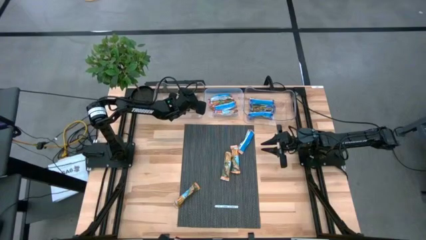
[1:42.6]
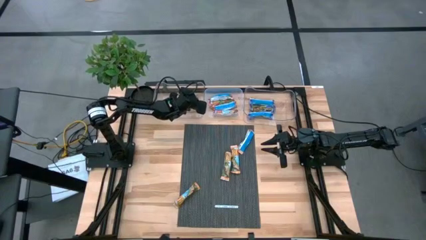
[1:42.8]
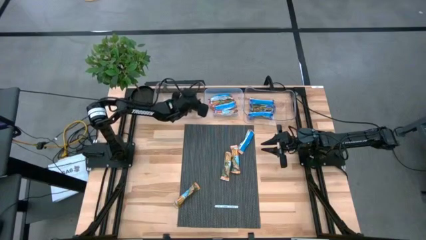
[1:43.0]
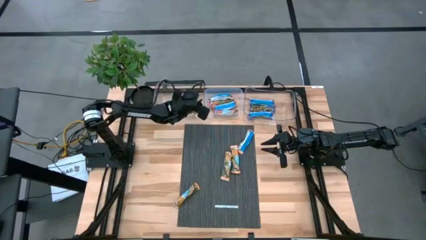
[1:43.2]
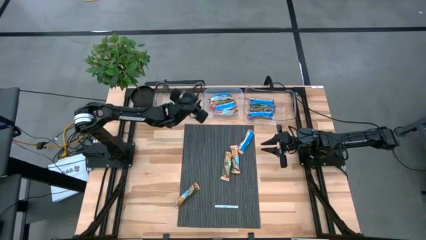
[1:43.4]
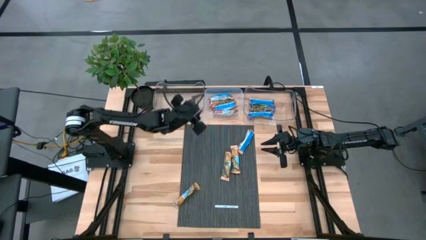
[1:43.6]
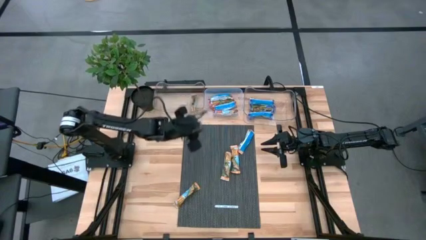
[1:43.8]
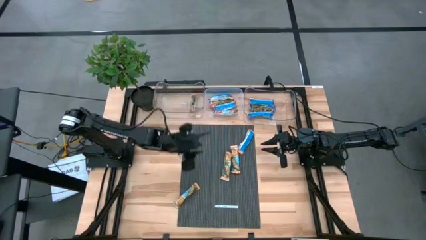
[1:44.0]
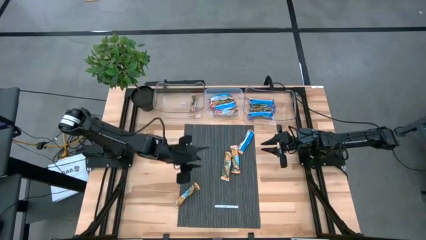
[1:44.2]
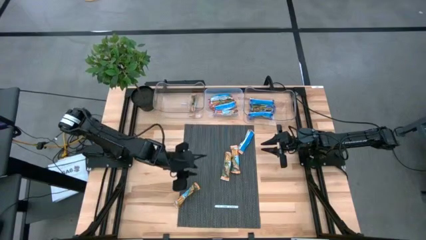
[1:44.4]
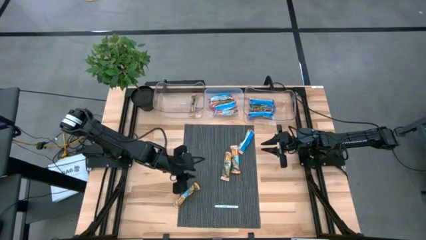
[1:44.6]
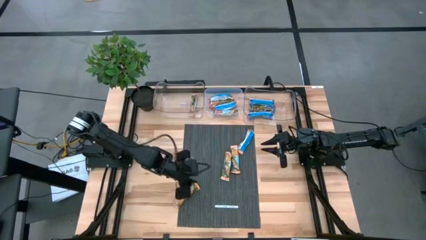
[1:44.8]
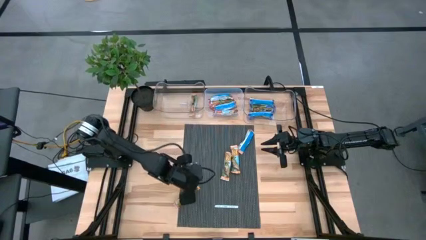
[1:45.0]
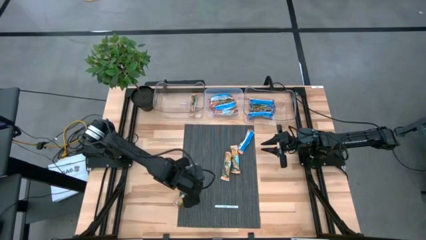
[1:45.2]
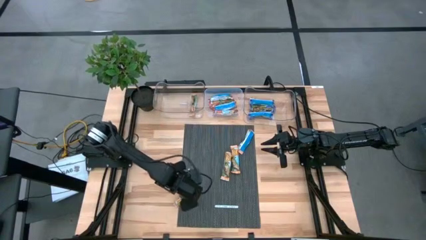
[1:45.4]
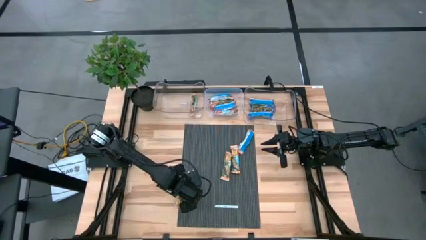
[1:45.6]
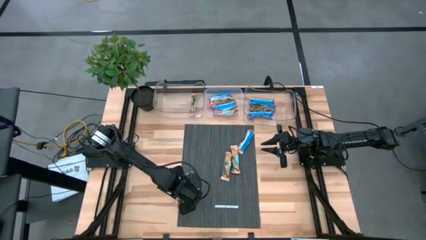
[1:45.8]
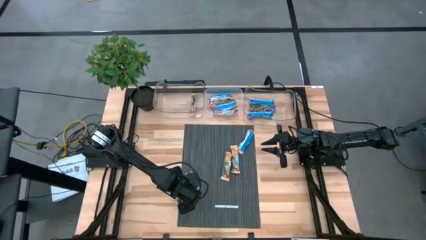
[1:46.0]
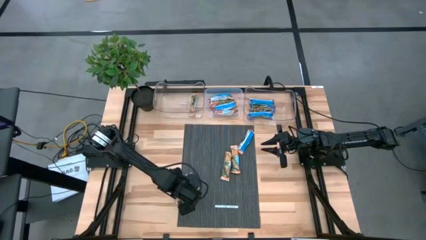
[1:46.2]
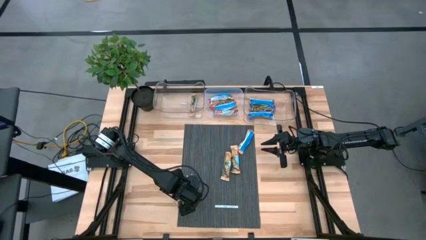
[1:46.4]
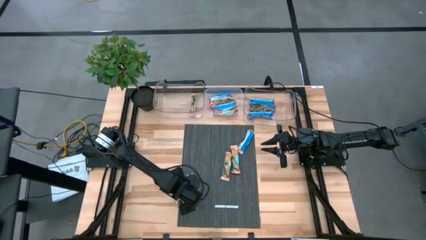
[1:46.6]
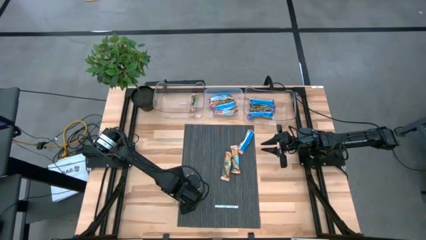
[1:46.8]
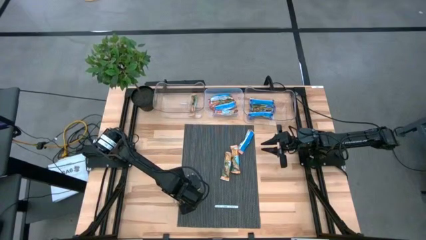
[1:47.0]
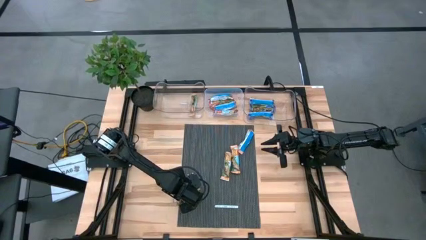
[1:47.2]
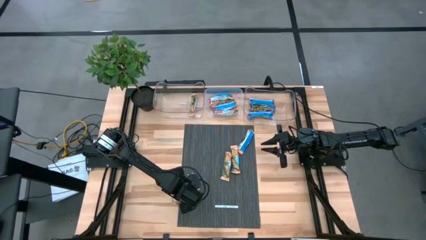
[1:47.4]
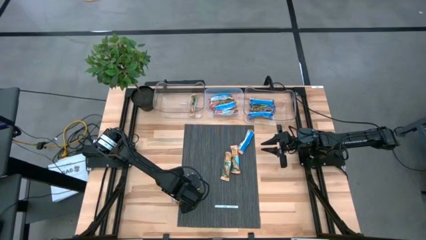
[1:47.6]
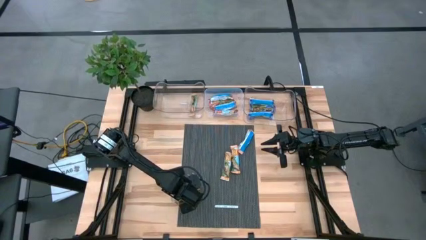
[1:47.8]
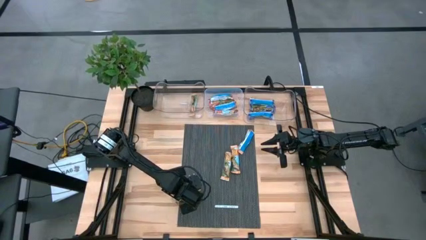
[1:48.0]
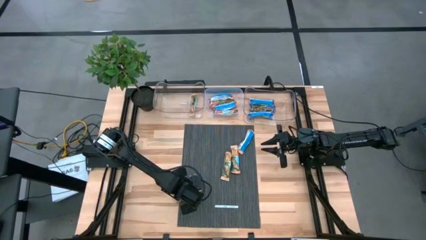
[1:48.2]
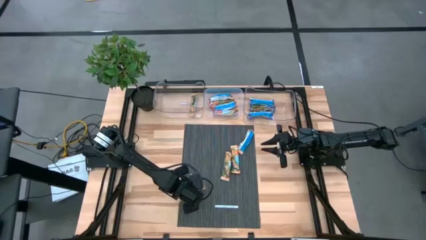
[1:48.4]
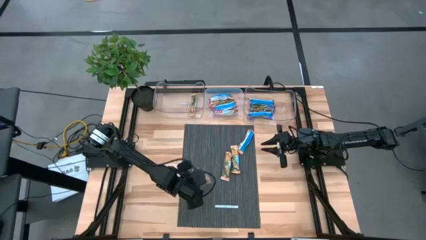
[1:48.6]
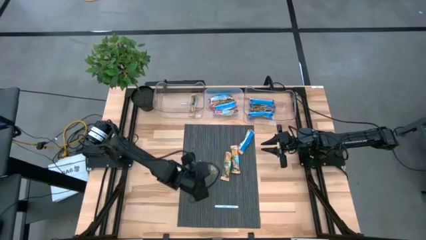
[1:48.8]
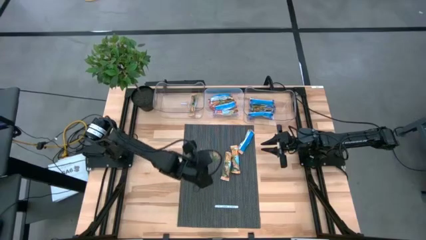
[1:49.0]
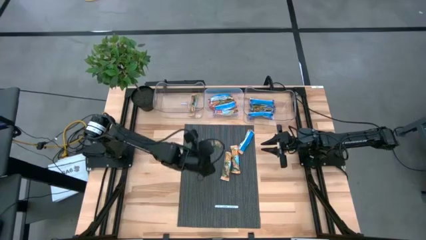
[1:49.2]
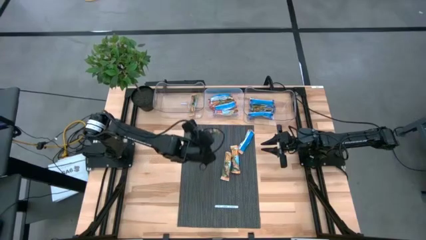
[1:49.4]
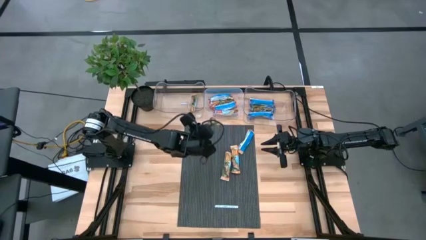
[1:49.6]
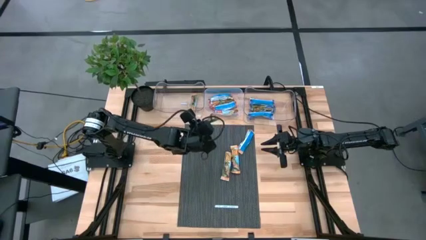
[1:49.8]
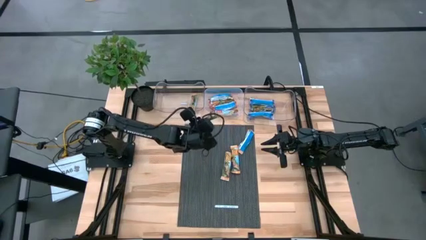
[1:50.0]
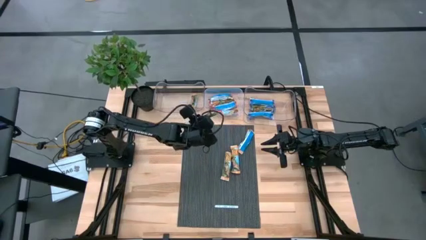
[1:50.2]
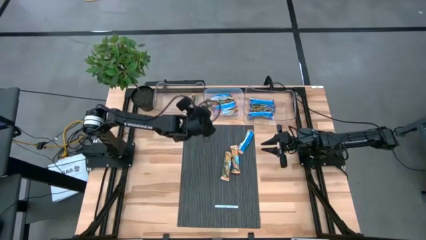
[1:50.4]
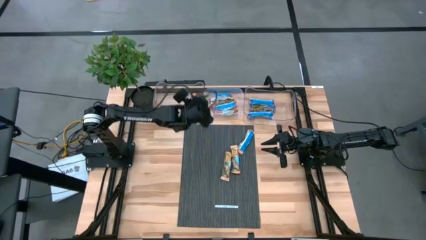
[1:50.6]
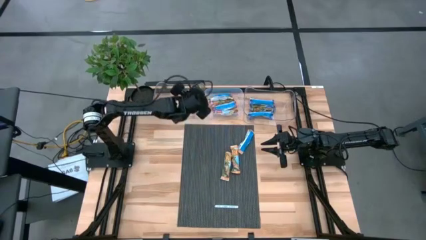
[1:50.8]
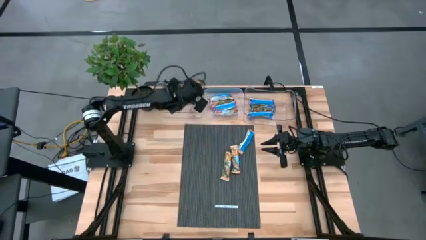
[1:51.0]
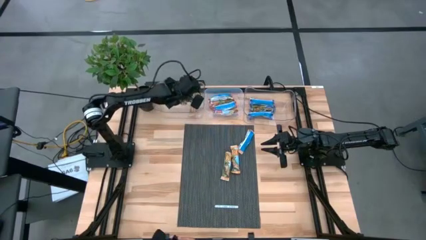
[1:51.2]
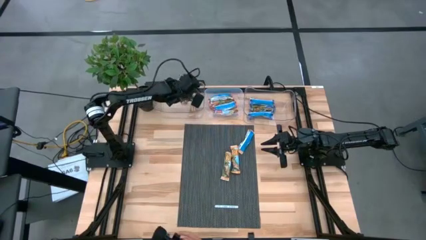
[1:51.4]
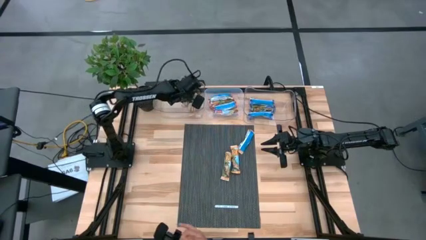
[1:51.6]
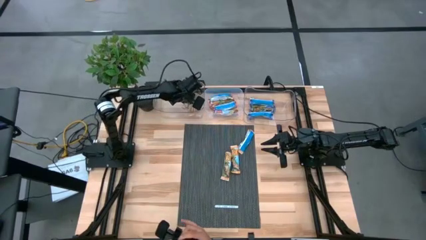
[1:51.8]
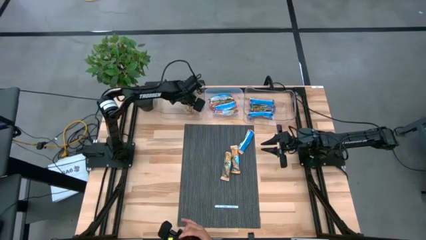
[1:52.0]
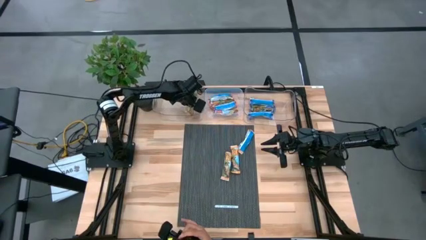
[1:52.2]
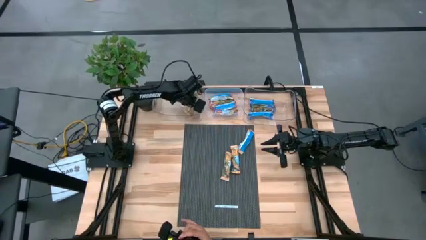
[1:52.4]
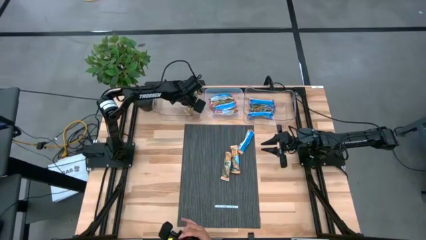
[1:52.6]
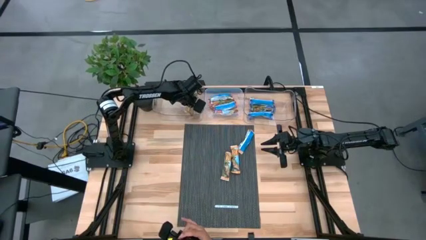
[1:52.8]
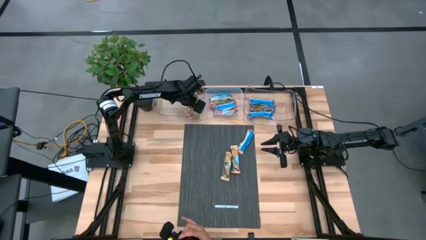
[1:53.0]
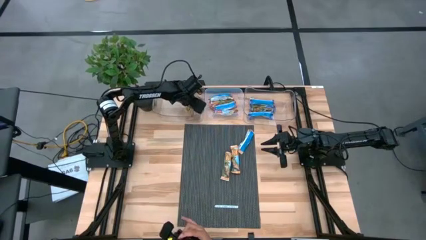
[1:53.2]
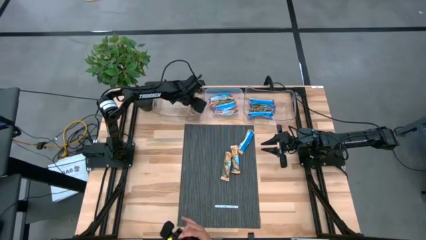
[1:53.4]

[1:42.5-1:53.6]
Task: Pick and place Granola Bars by type
Put the orange granola bar into the left transparent bin

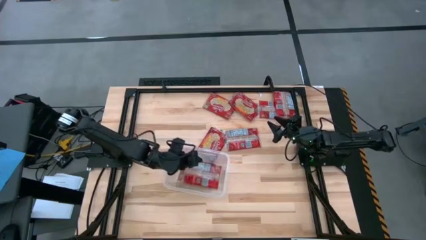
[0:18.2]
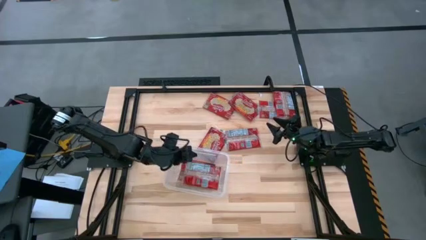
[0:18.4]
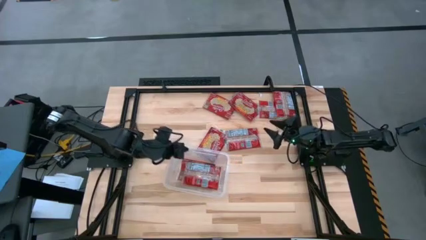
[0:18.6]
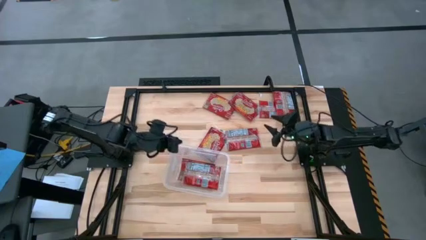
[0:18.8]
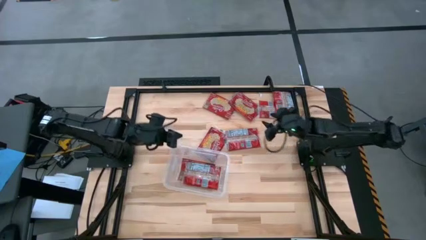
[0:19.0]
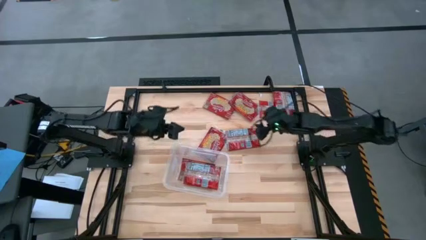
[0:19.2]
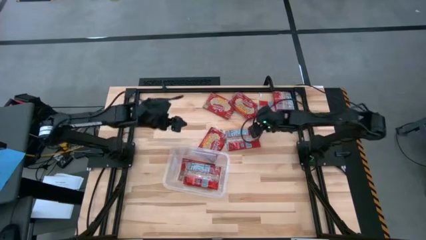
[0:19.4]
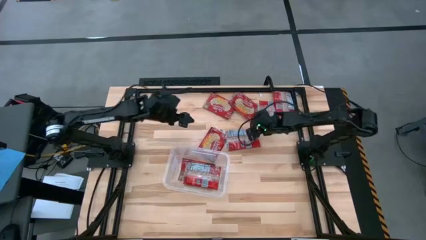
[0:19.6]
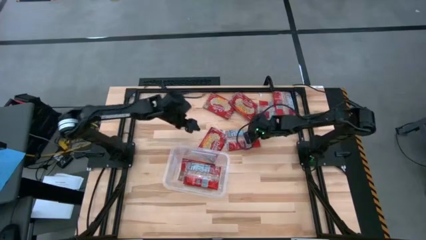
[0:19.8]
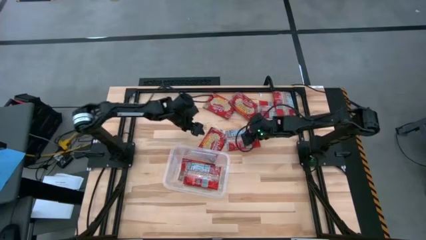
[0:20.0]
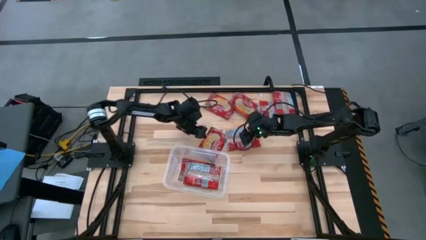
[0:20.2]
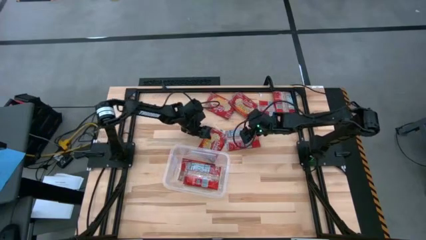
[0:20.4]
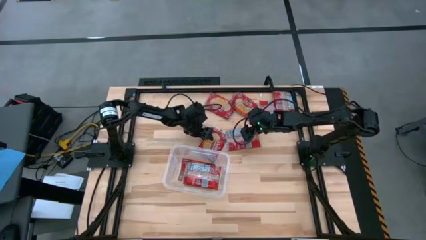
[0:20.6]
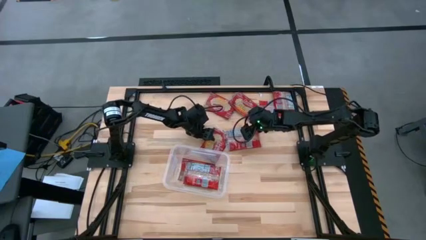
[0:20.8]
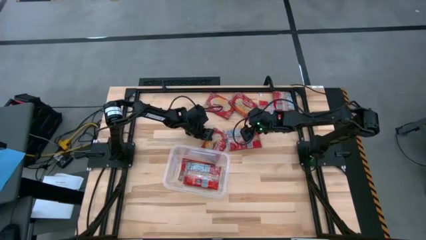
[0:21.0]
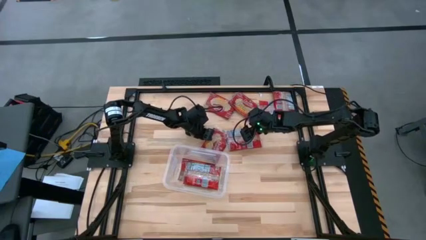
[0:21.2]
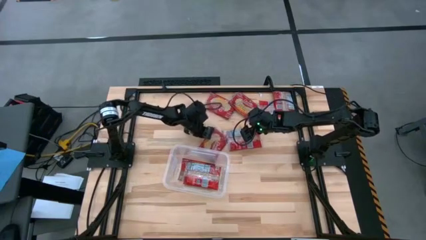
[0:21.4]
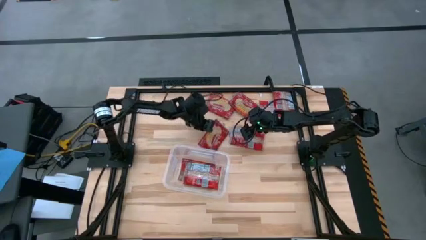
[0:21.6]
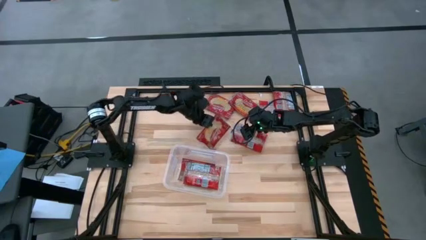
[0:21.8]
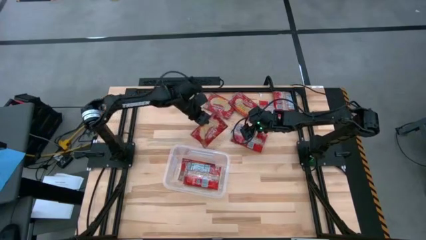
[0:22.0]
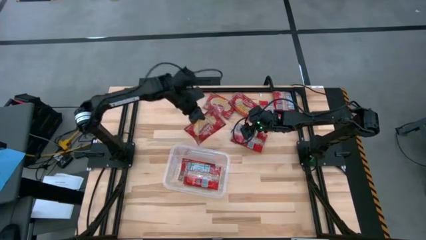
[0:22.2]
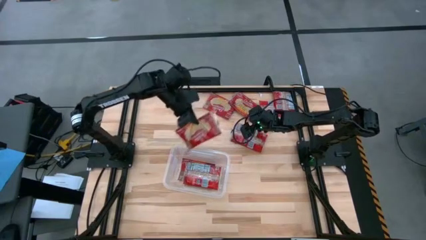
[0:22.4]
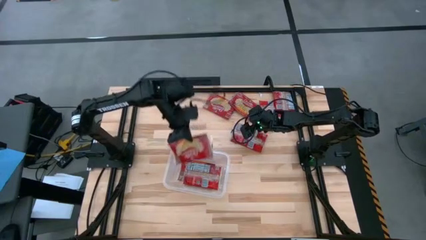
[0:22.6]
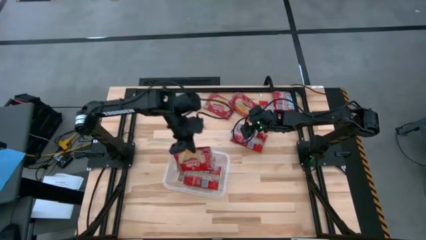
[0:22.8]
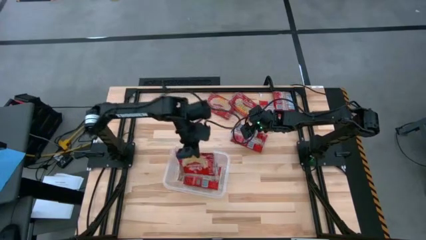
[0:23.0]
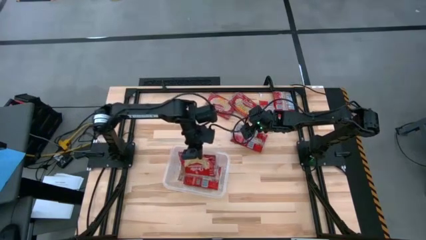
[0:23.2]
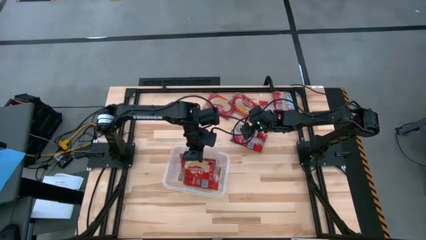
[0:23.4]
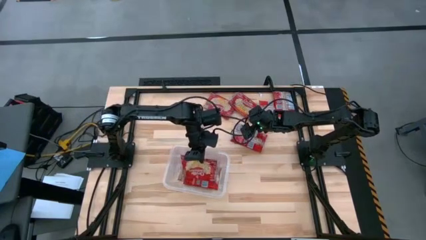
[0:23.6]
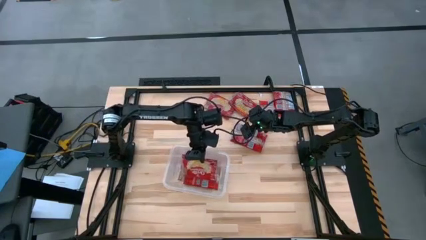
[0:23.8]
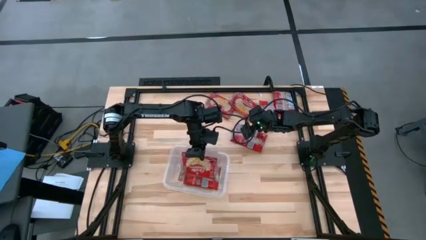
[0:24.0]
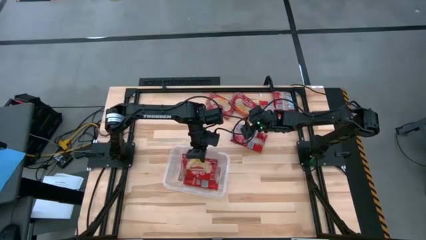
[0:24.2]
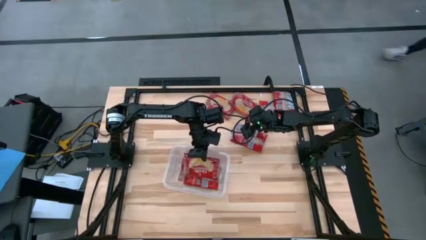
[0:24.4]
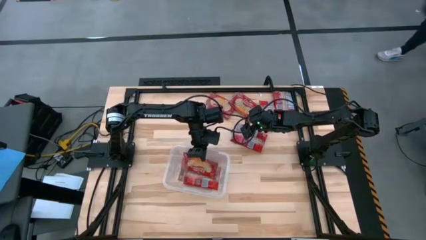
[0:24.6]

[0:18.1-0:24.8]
Task: Sort popcorn bags into baskets
Put the red popcorn bag into the container
